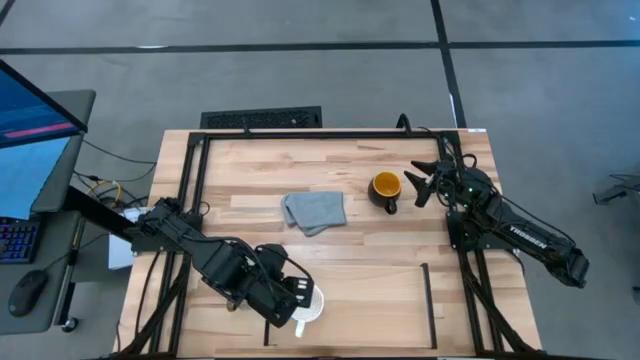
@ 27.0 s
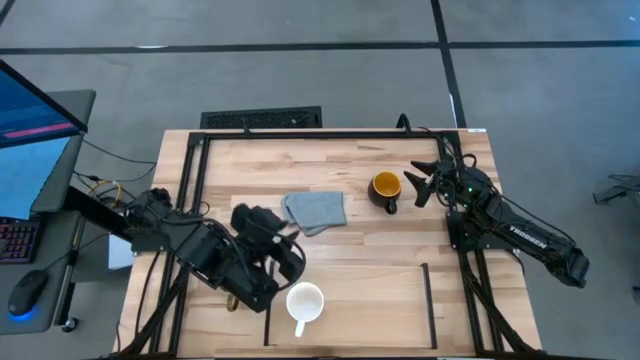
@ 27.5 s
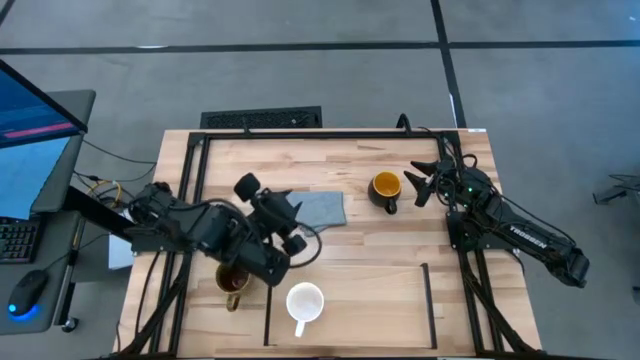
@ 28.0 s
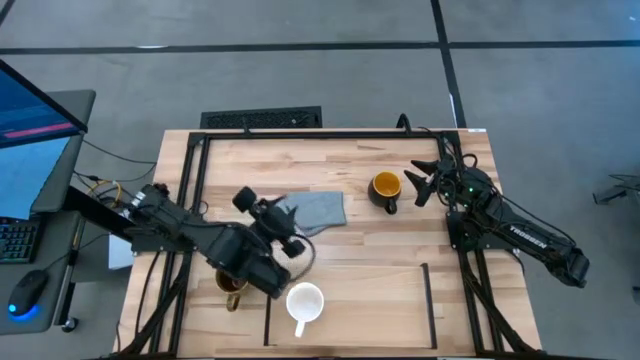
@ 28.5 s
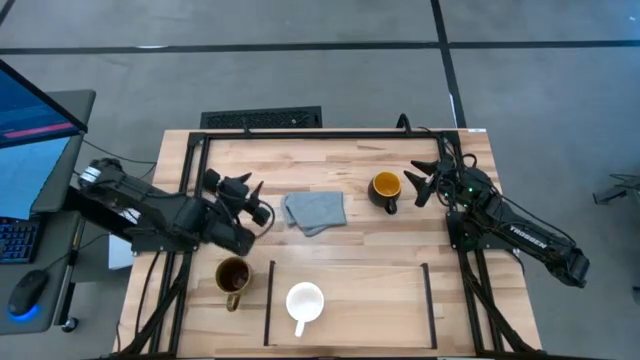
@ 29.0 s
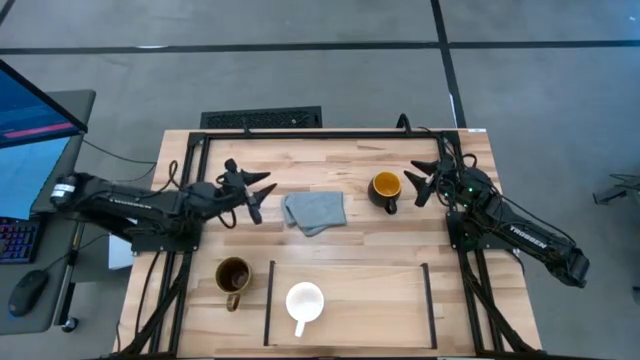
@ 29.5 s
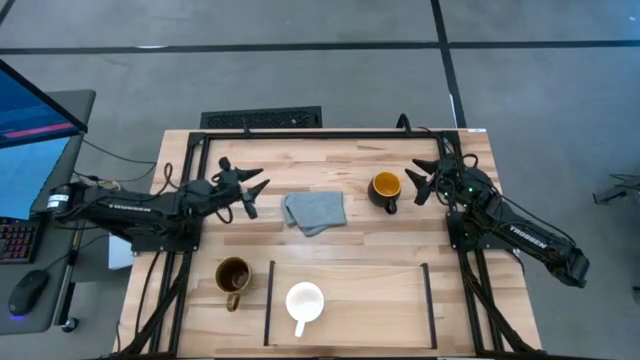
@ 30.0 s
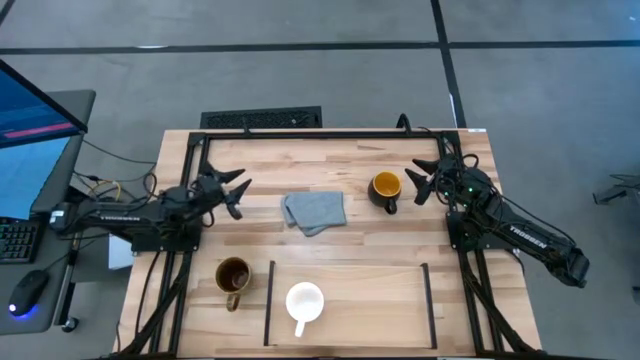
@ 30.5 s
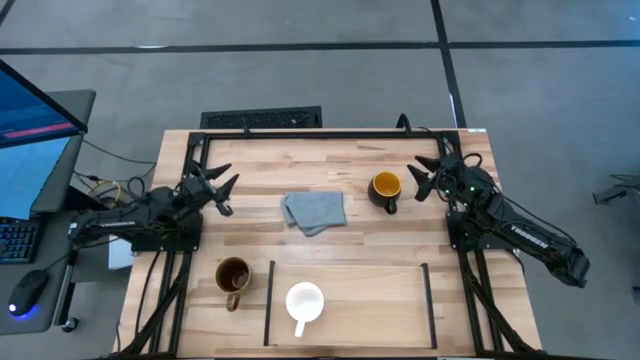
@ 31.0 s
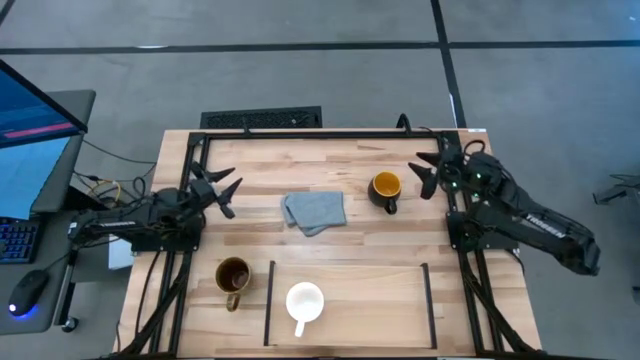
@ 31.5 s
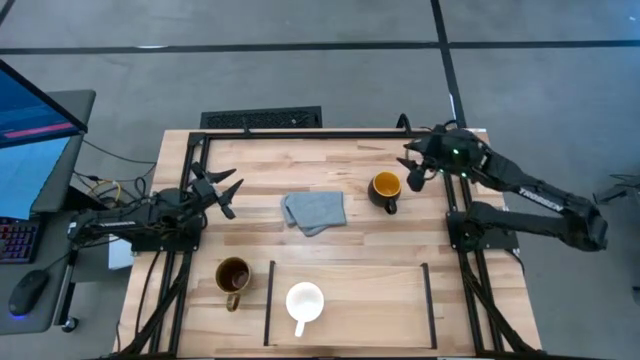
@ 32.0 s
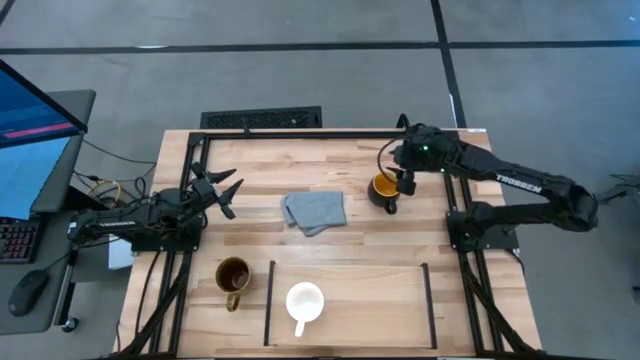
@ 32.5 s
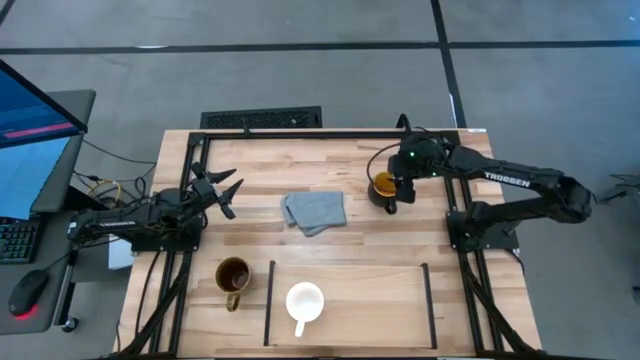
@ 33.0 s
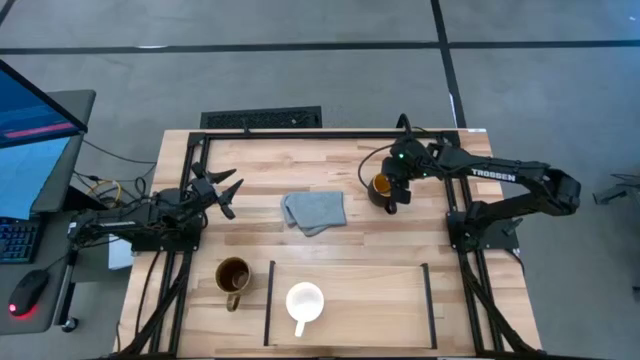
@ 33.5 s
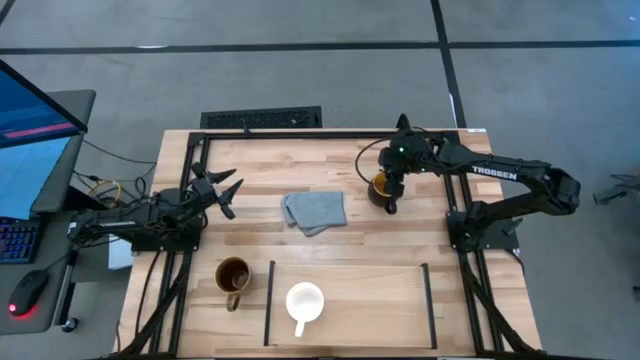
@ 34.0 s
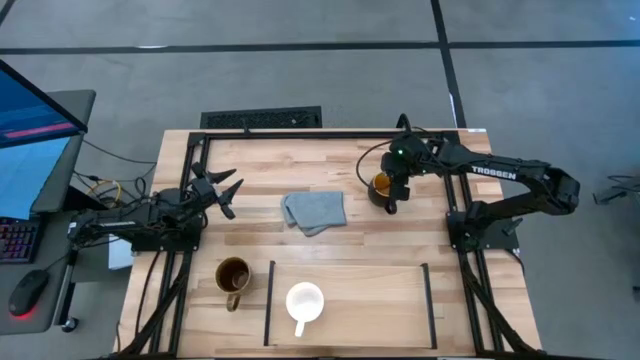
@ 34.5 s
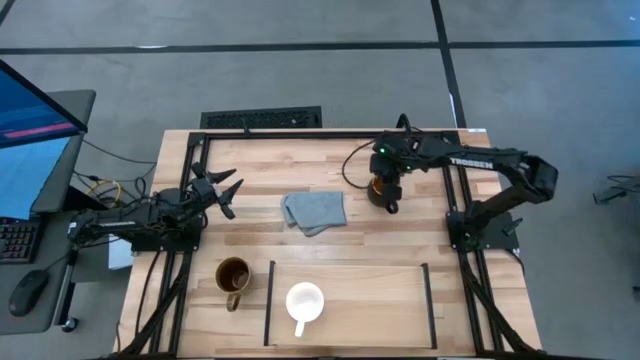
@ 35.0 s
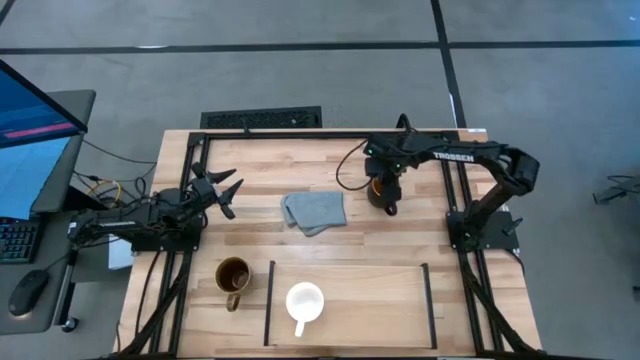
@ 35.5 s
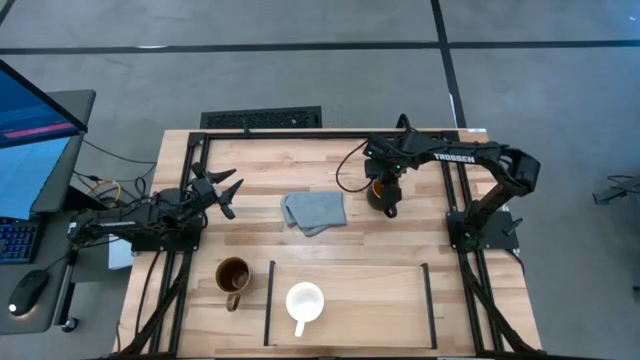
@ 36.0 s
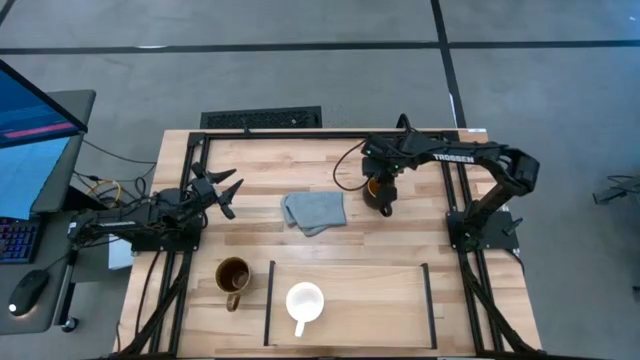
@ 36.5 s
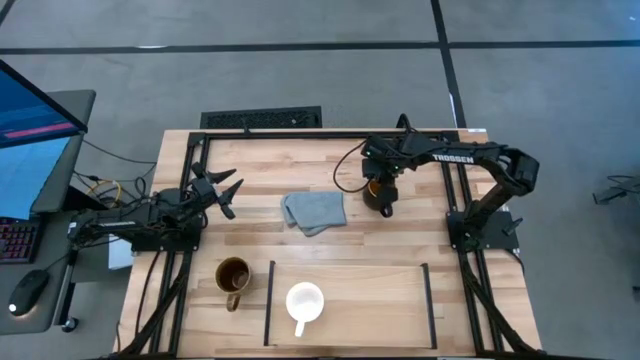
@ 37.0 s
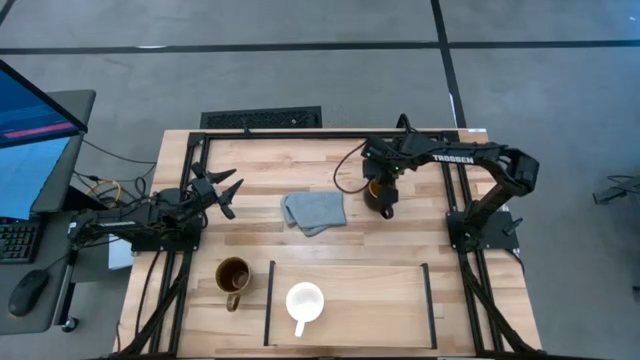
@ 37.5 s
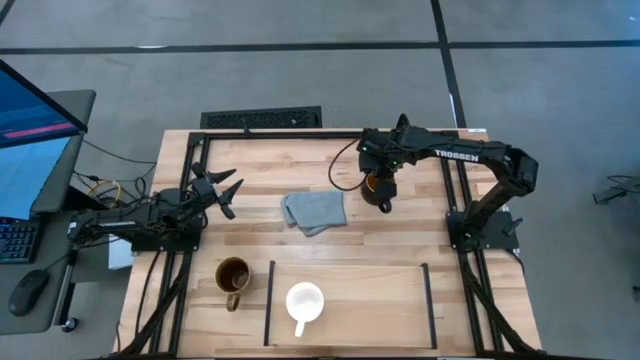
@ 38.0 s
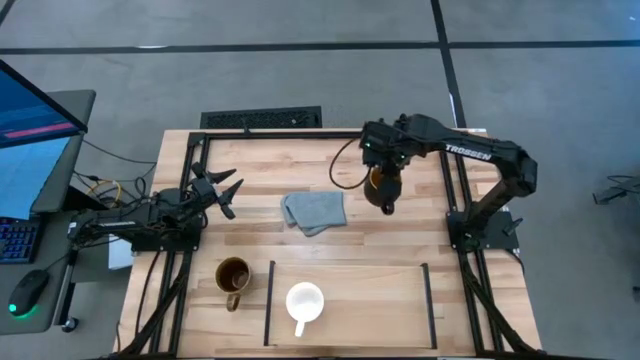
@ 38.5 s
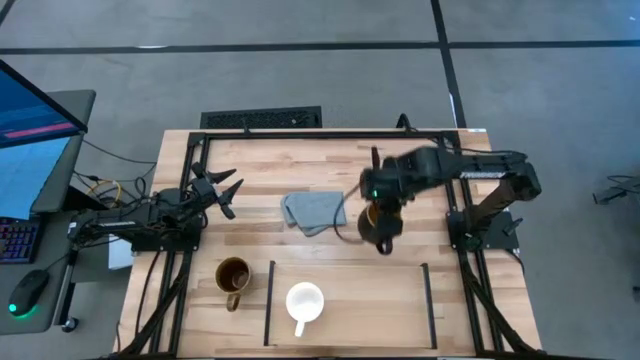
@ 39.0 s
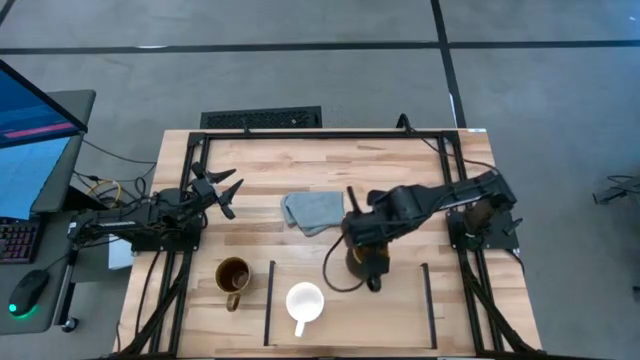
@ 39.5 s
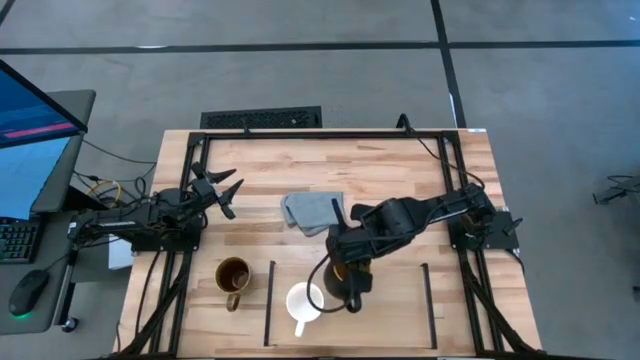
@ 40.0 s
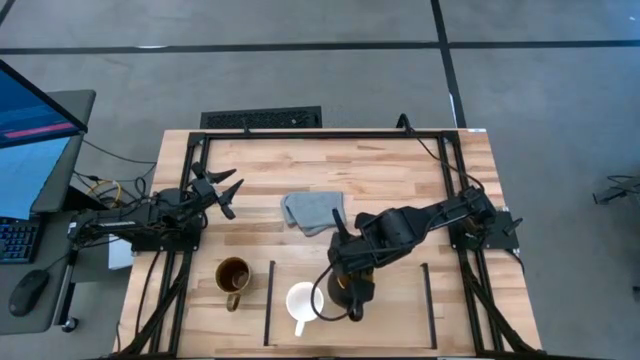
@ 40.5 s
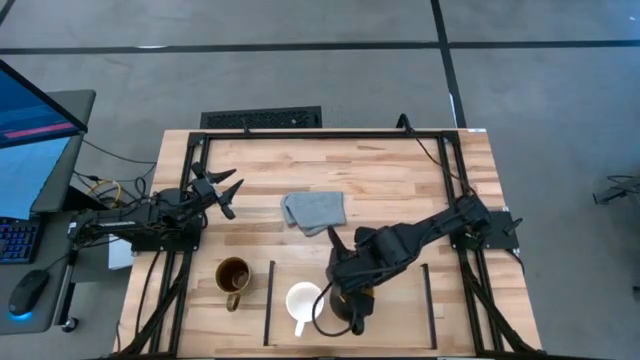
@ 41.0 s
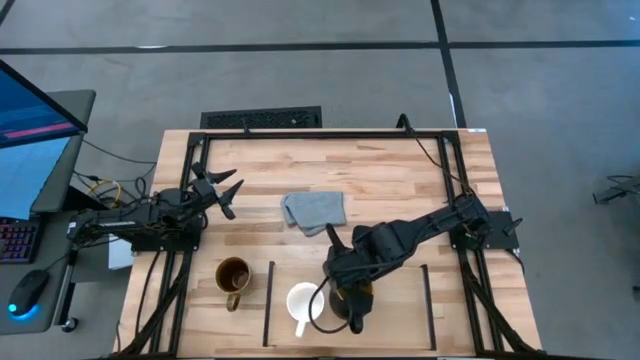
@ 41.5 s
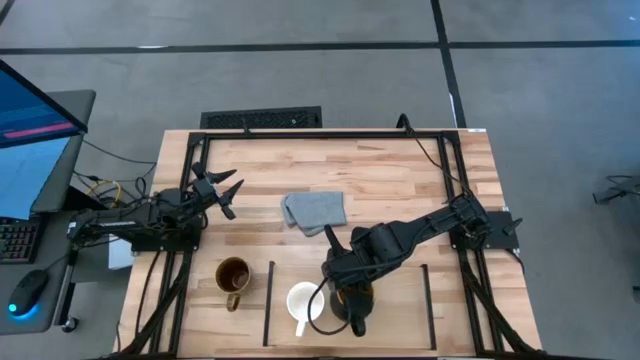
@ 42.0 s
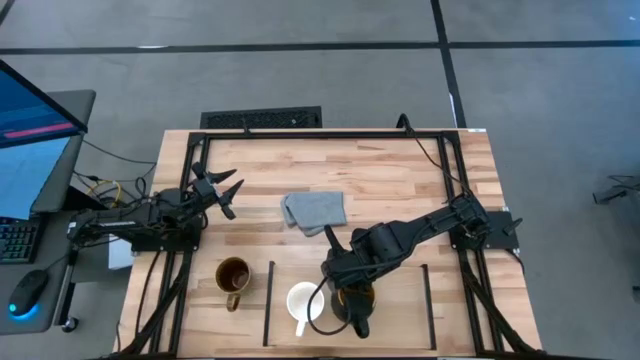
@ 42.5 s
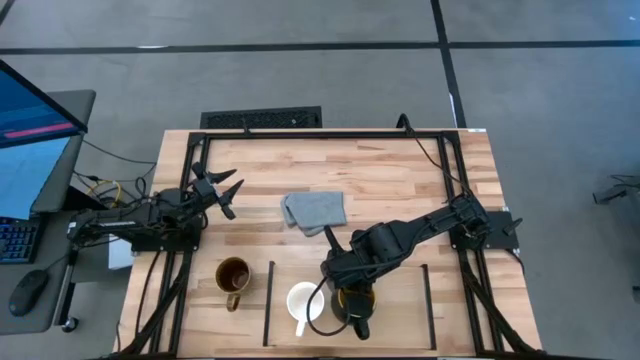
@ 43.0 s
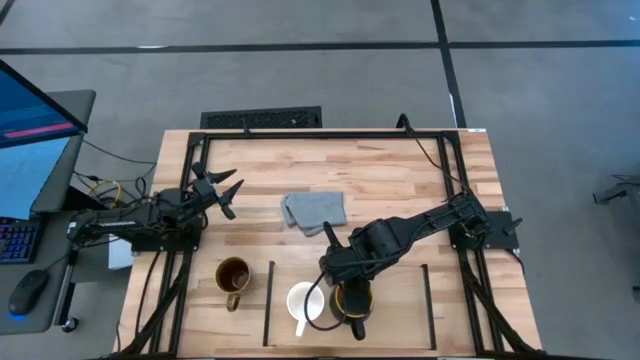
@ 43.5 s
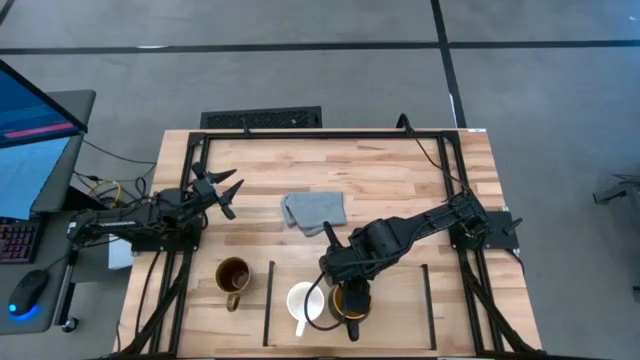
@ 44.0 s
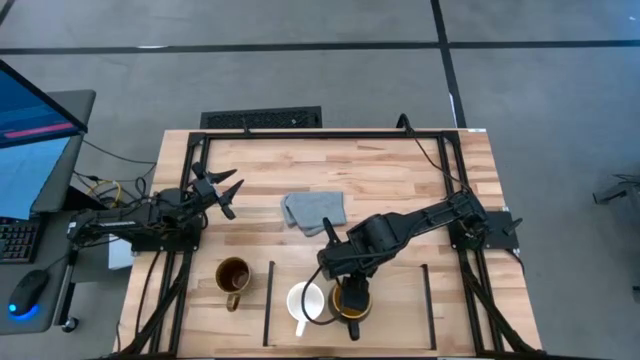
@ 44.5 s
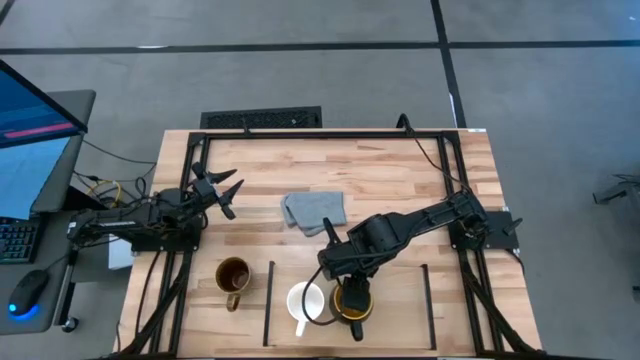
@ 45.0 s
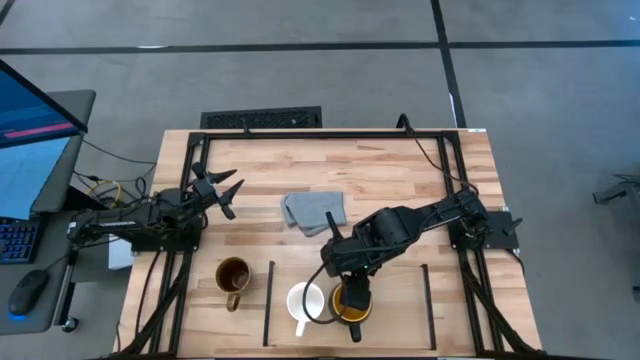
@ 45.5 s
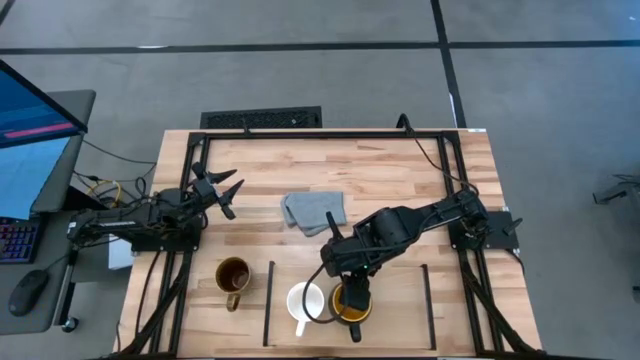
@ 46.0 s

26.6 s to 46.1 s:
Task: Stack small to large cups/mugs on shelf
Put the black mug on the shelf

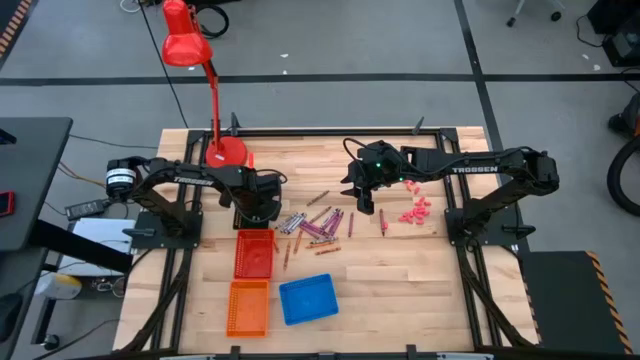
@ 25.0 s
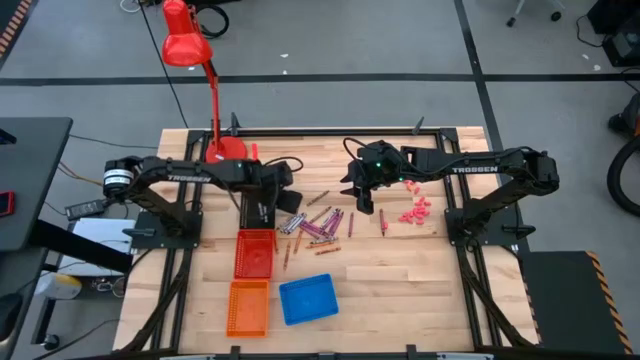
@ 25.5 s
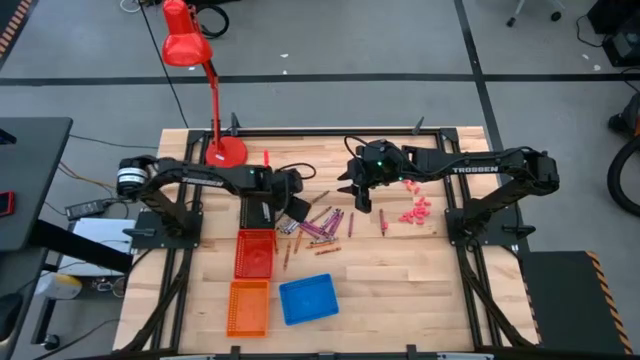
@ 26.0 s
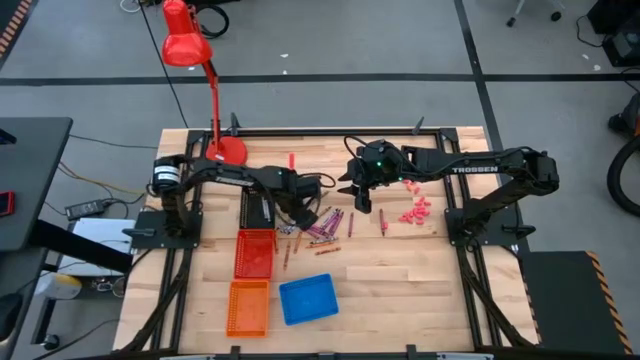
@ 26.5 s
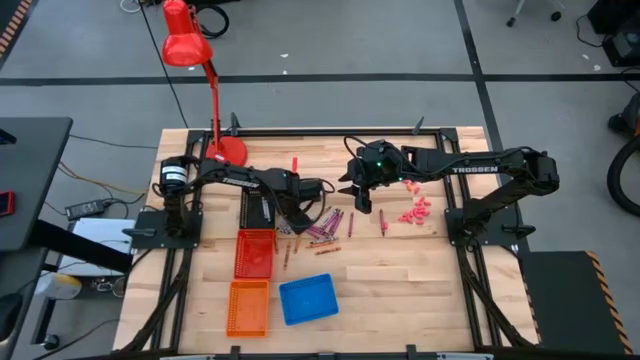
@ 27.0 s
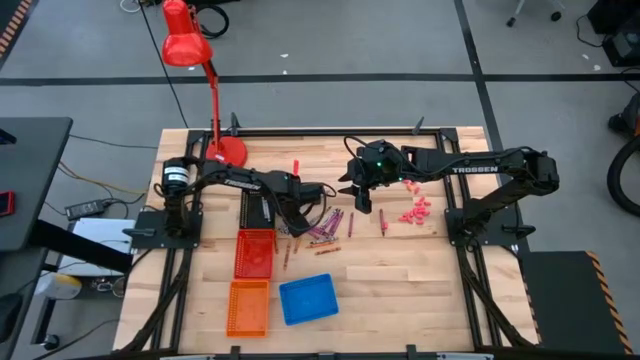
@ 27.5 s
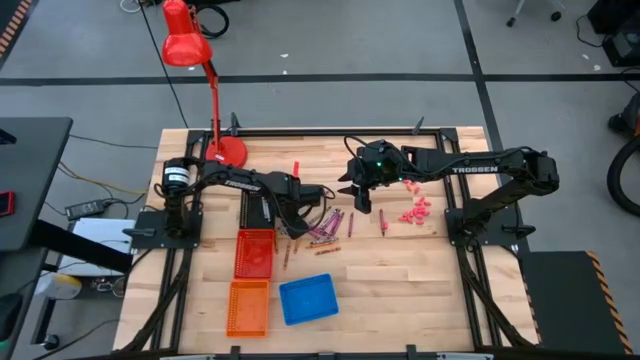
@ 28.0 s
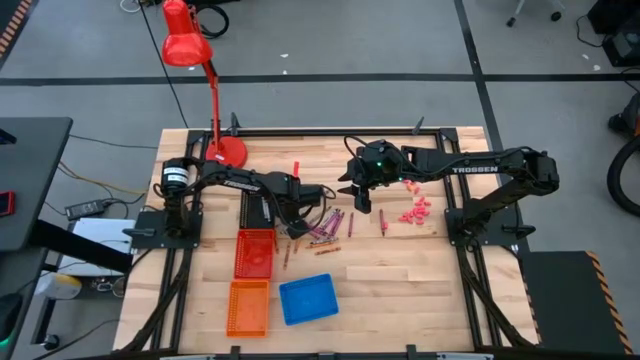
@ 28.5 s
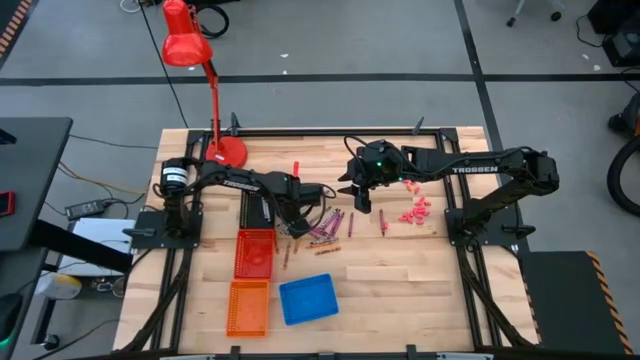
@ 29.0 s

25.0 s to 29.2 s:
Task: Sort crayons
Put the black crayon into the black bin
